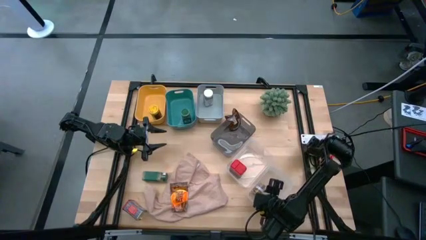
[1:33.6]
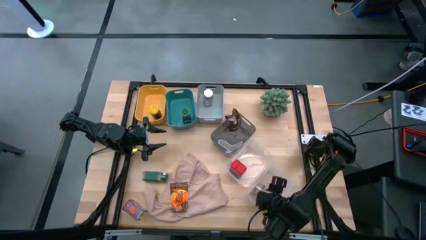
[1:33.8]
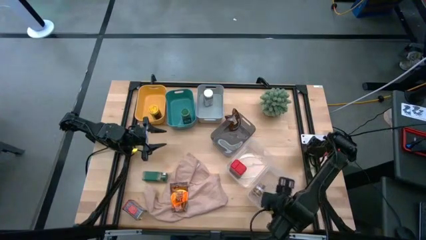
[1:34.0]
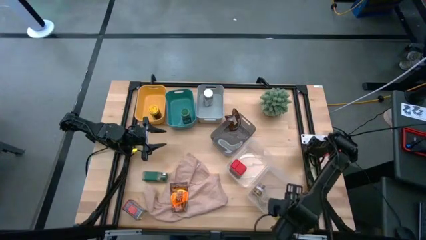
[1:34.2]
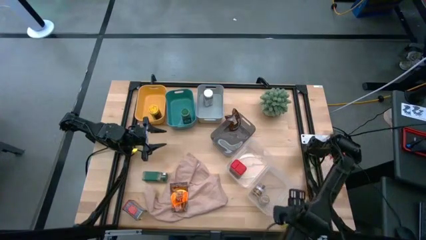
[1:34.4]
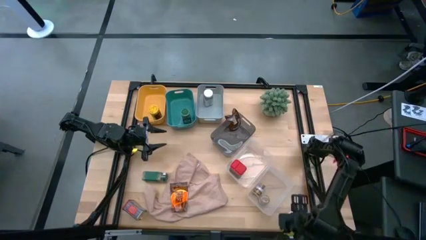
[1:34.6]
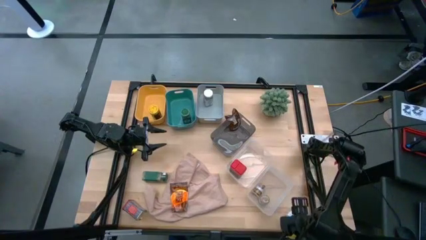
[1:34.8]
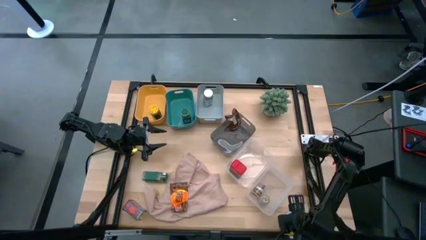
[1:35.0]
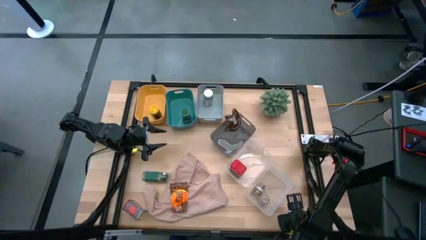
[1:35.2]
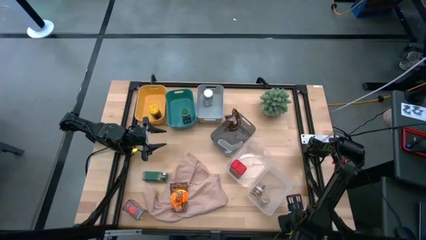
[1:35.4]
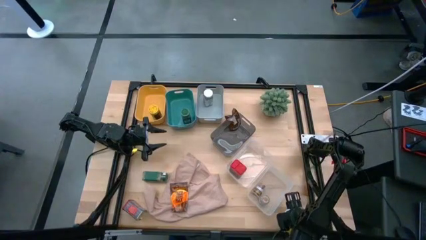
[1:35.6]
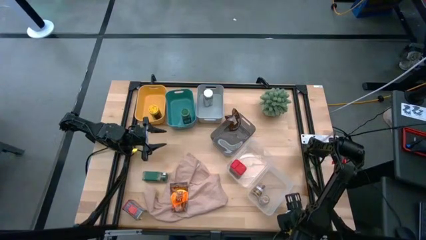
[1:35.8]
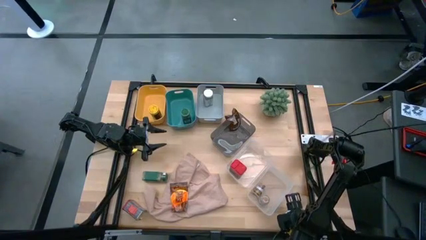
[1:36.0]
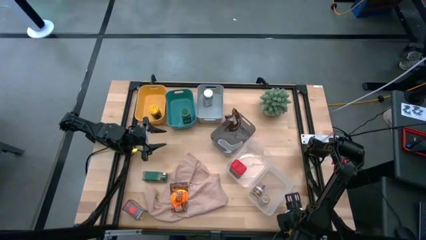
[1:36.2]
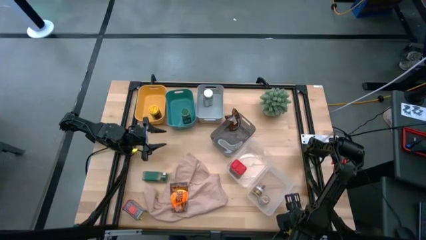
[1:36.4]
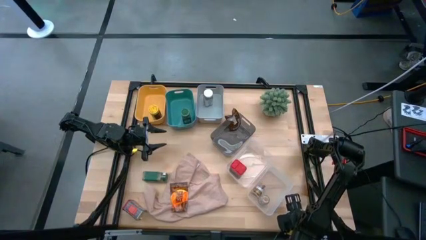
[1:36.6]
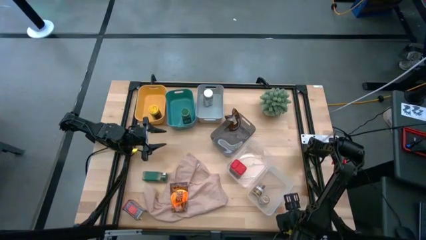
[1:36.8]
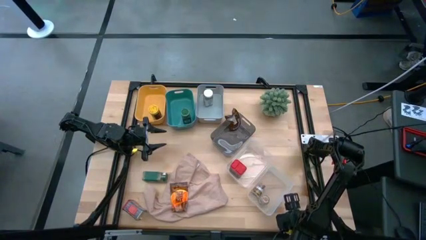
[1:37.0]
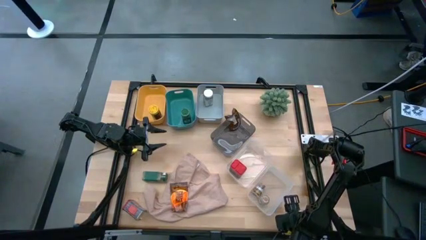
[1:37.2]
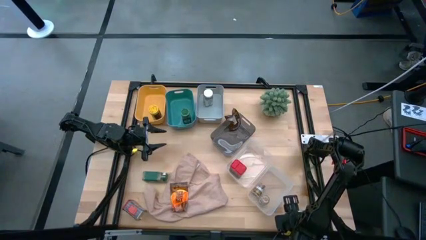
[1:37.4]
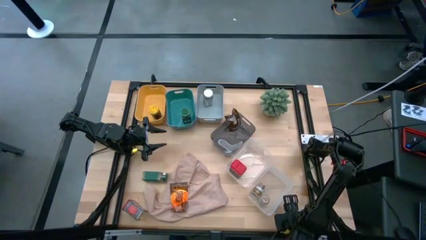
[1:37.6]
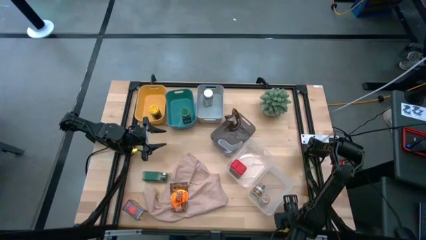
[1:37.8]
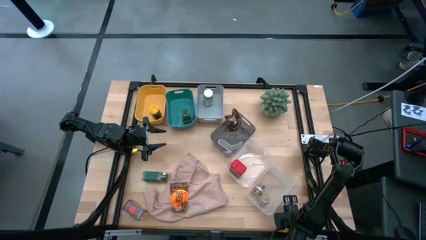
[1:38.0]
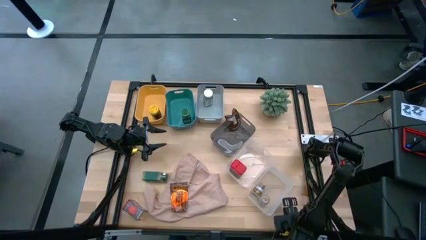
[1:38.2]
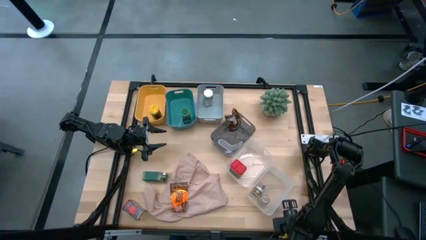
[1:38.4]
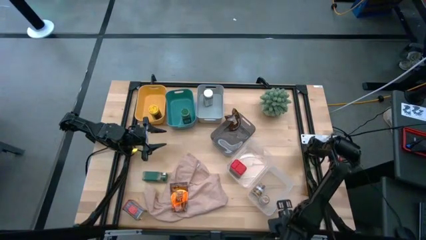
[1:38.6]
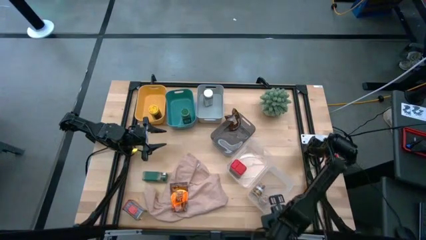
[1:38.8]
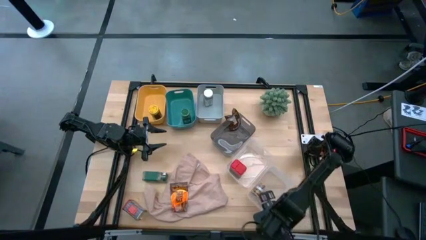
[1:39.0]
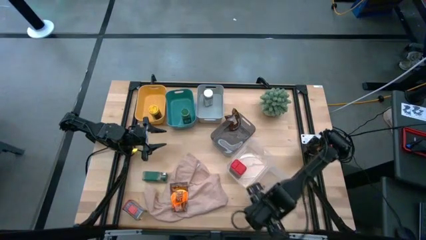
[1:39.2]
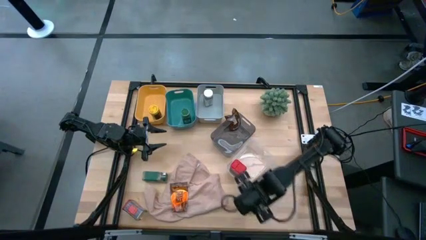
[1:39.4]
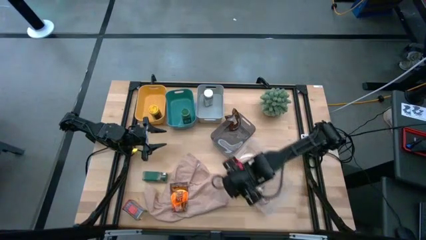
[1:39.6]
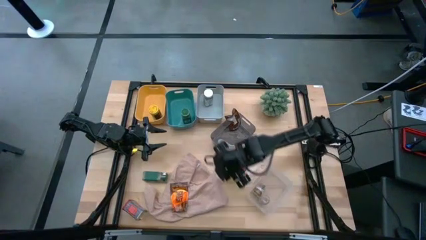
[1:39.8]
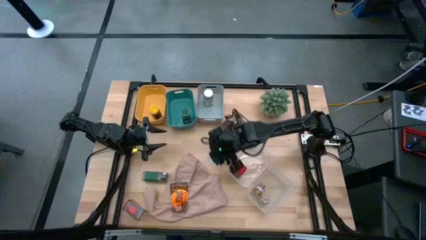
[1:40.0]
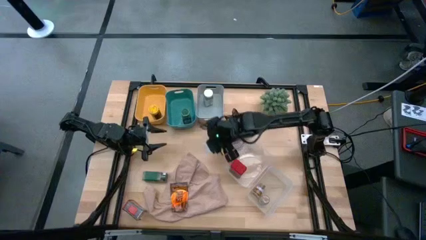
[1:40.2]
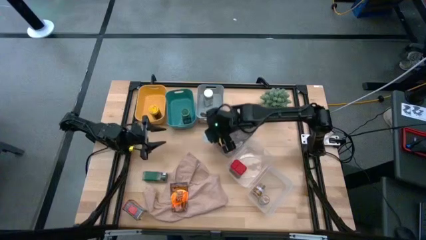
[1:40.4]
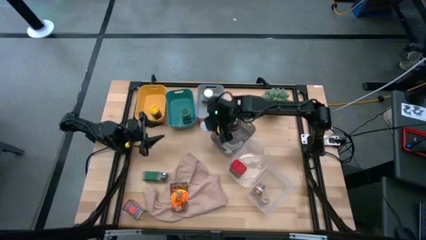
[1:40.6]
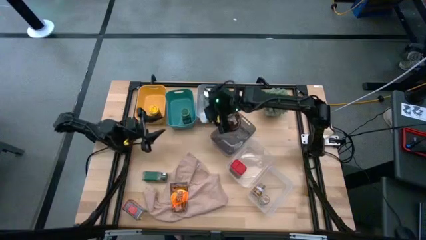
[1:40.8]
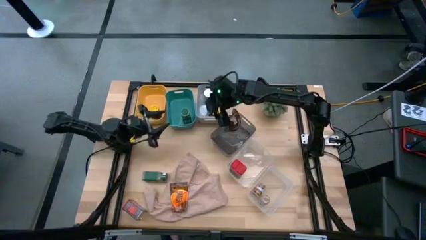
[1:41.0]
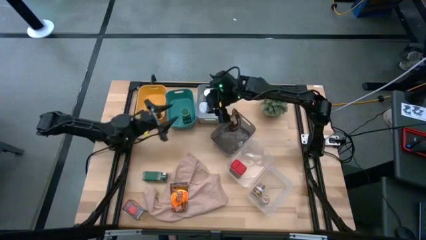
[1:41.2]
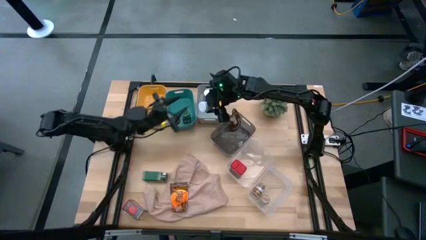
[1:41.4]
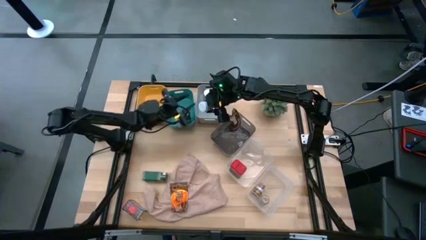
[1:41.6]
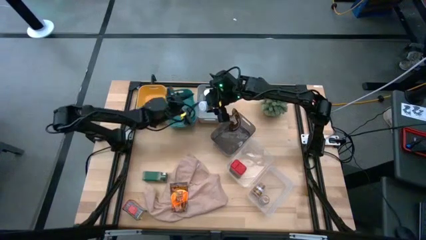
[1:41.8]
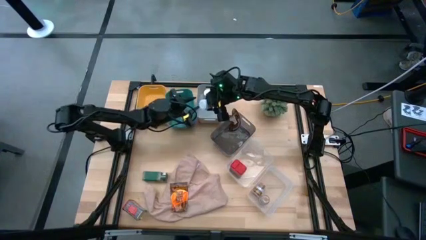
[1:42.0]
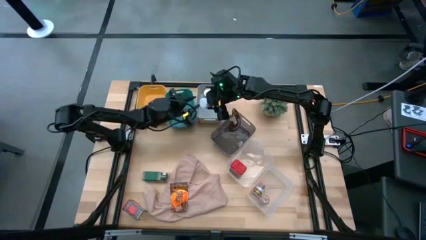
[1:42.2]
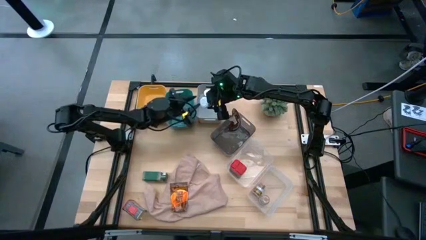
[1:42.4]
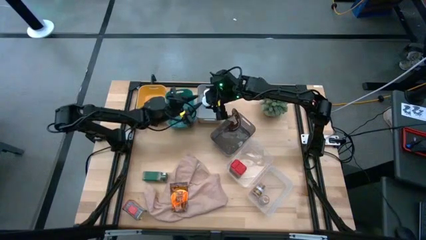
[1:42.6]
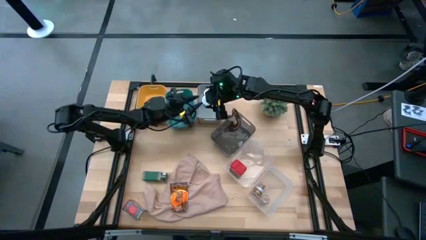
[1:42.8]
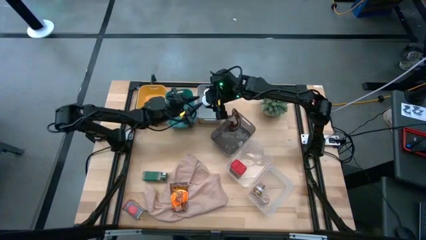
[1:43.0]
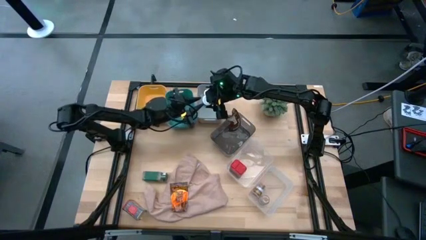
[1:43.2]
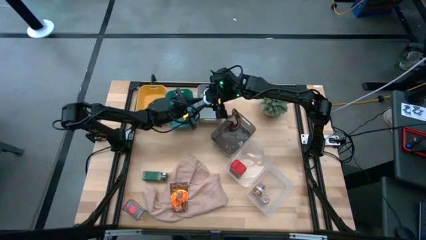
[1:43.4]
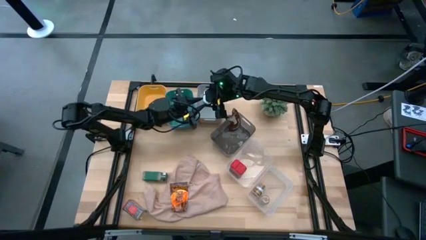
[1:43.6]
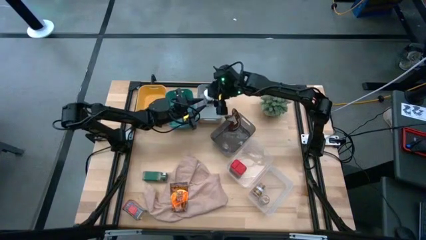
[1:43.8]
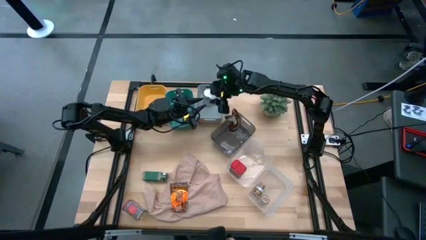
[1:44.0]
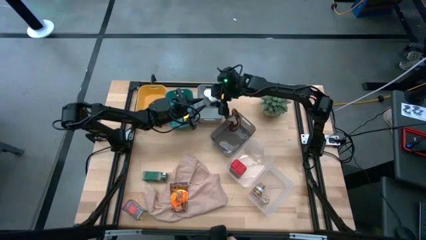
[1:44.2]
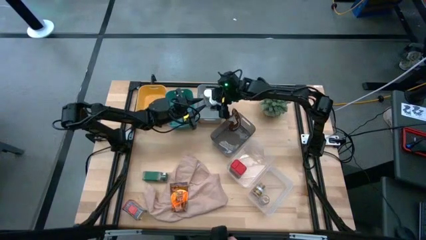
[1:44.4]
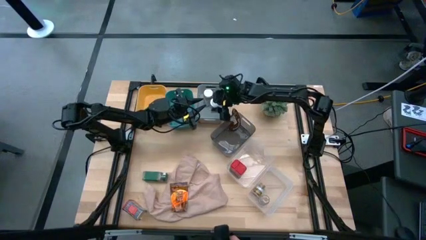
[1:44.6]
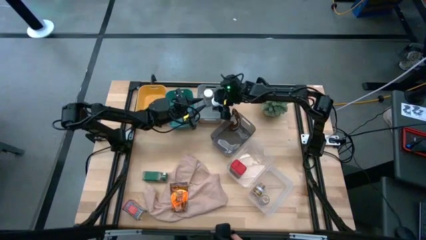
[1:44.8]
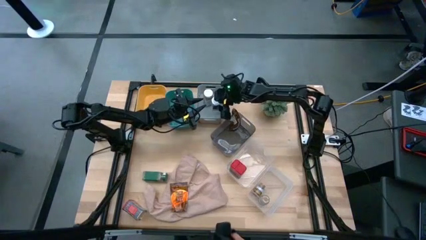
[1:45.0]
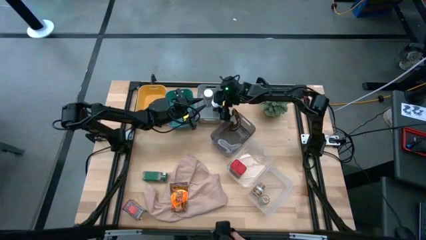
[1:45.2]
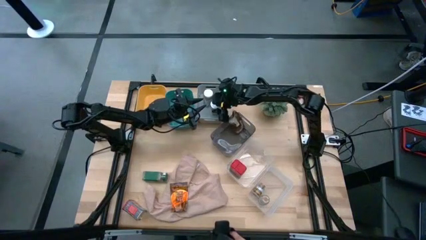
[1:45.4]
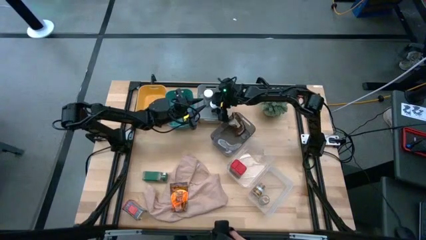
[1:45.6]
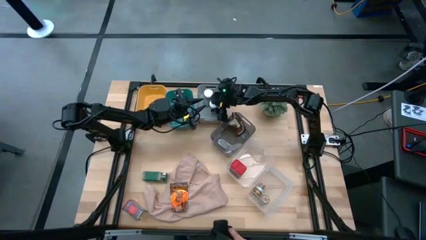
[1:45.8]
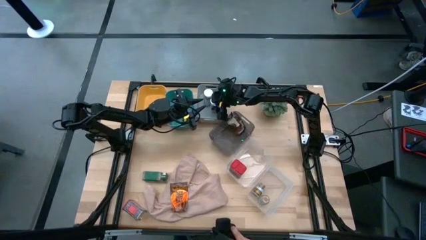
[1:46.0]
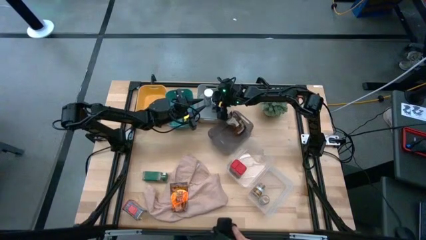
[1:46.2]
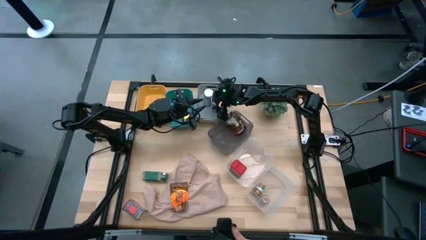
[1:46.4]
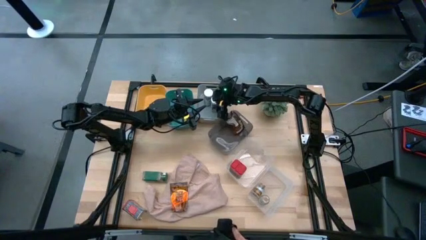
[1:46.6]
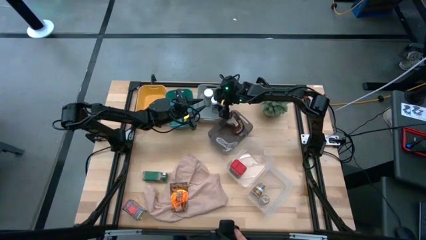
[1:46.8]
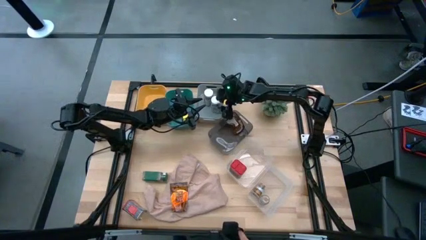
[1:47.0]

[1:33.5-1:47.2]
Task: Sort spices by type
Put the white seasoning bottle into the gray bin
